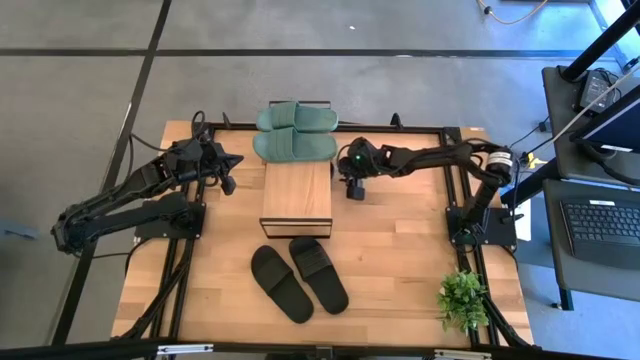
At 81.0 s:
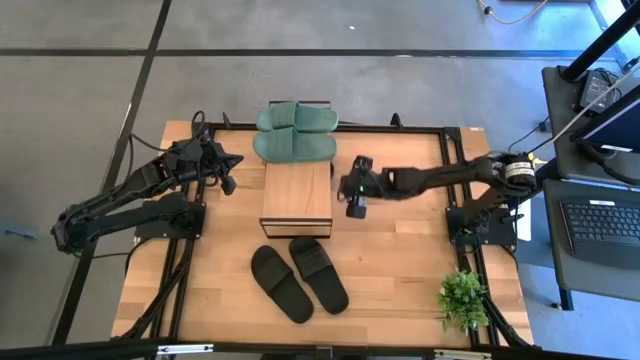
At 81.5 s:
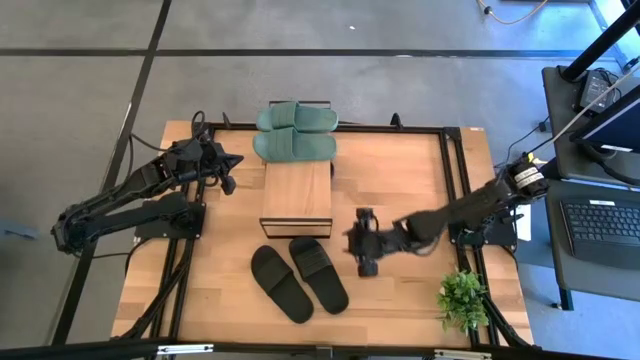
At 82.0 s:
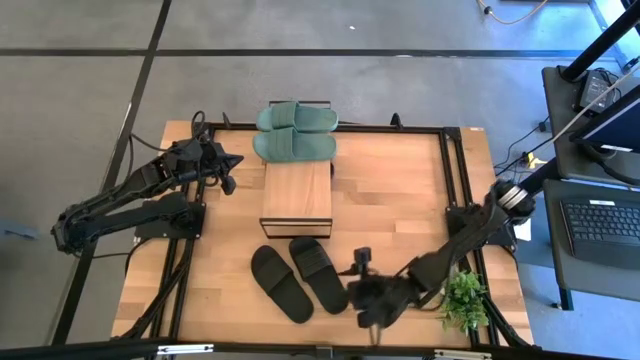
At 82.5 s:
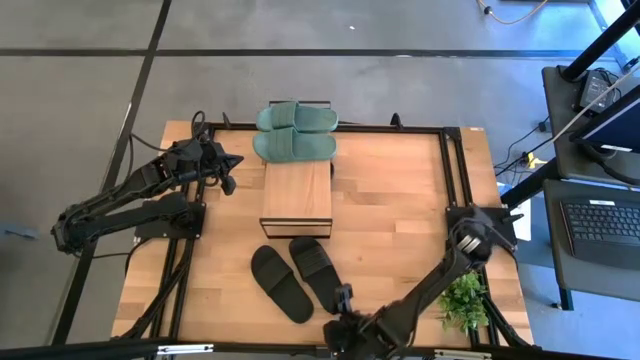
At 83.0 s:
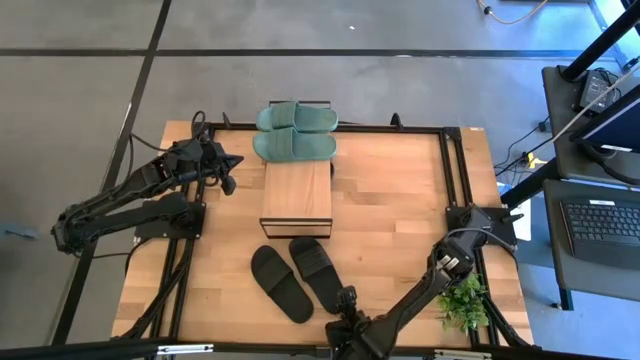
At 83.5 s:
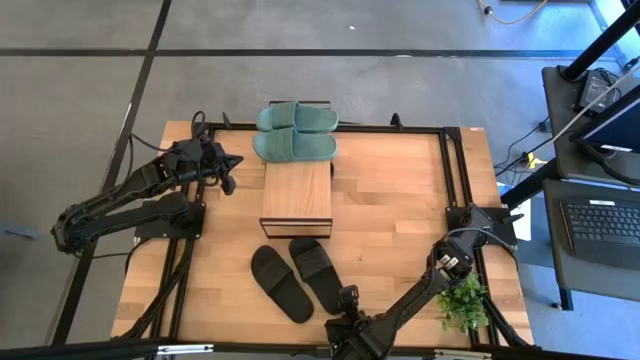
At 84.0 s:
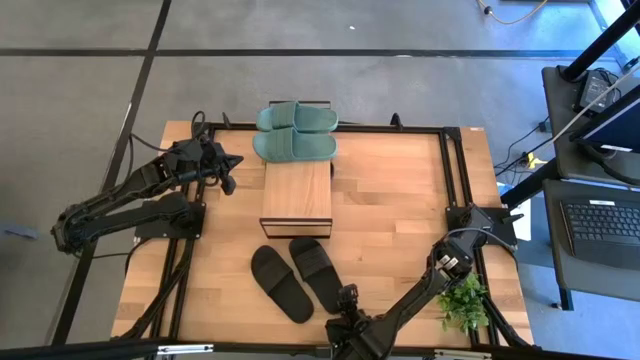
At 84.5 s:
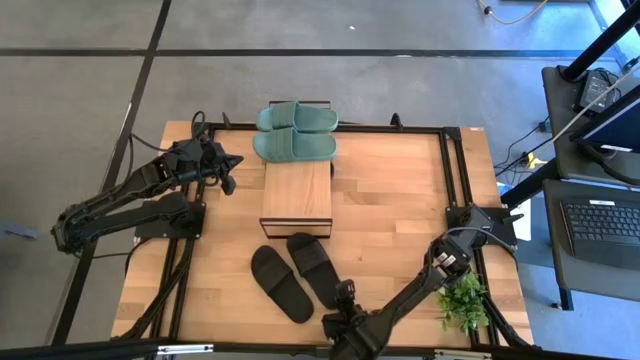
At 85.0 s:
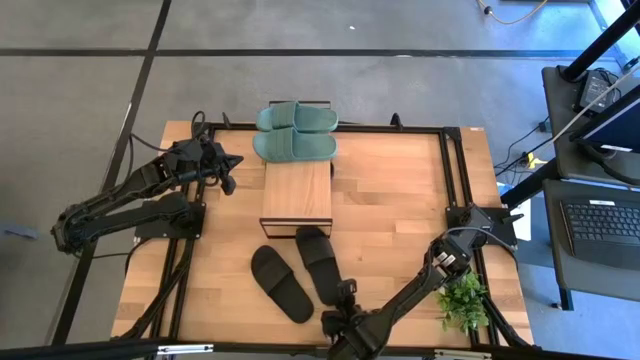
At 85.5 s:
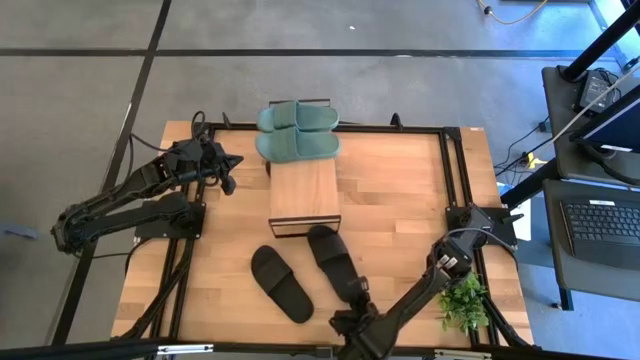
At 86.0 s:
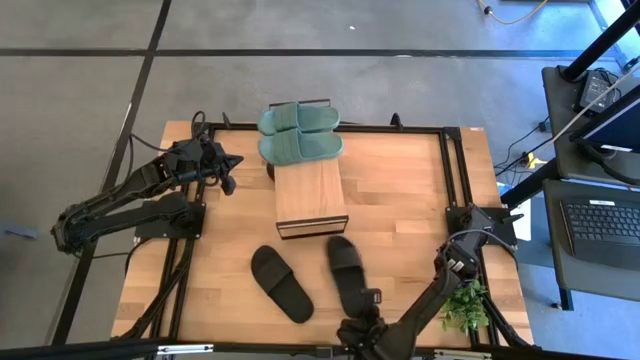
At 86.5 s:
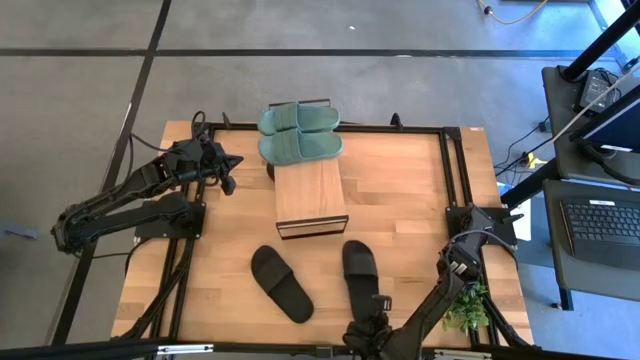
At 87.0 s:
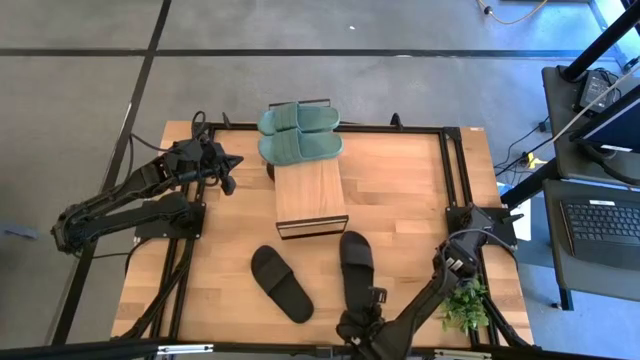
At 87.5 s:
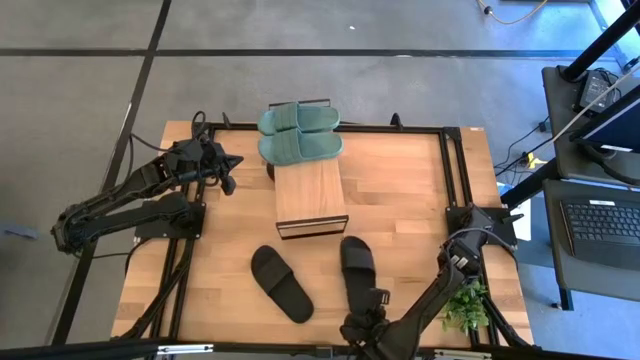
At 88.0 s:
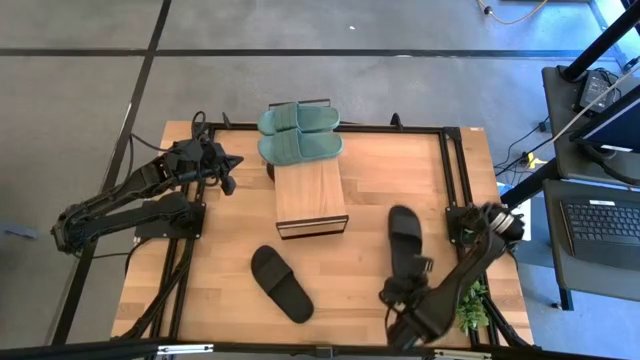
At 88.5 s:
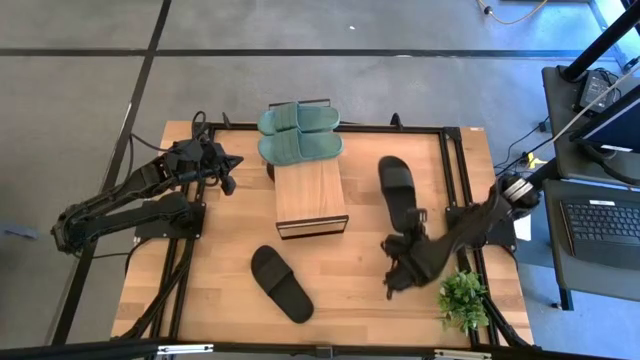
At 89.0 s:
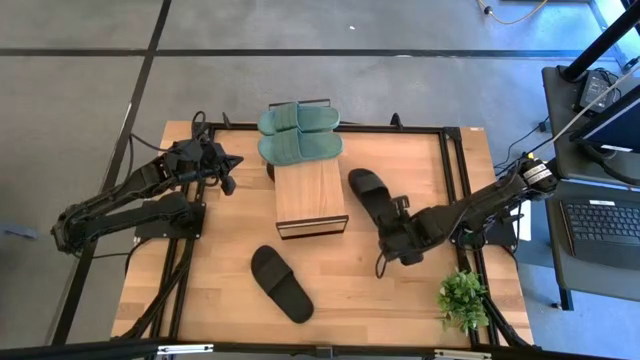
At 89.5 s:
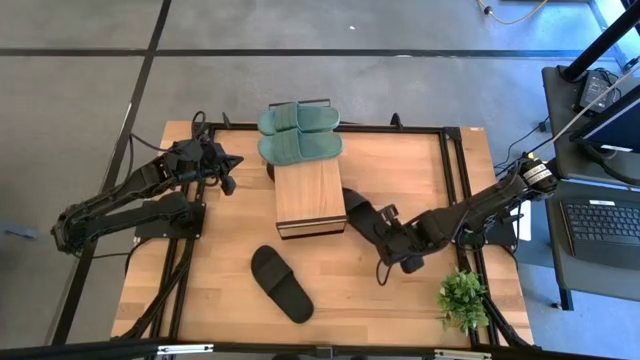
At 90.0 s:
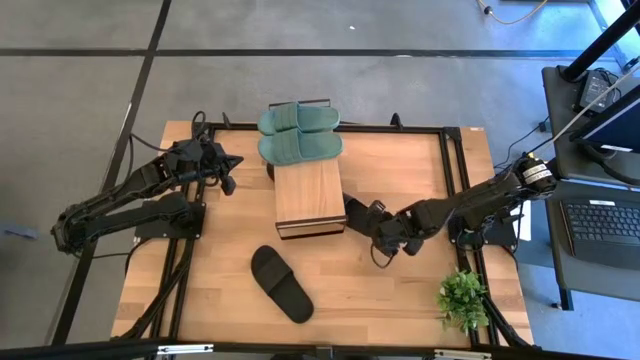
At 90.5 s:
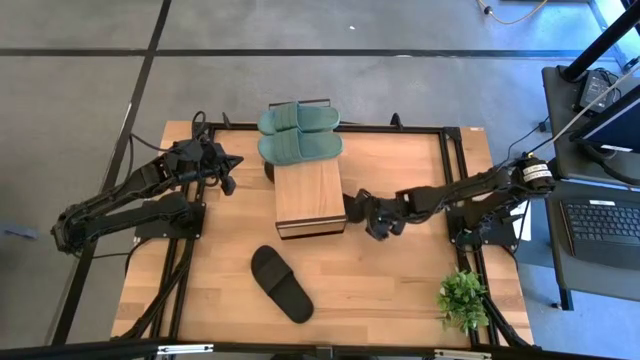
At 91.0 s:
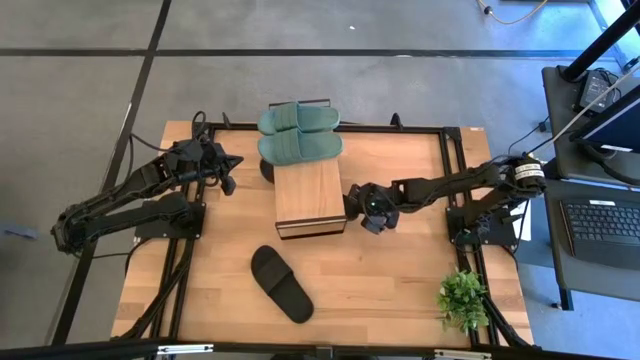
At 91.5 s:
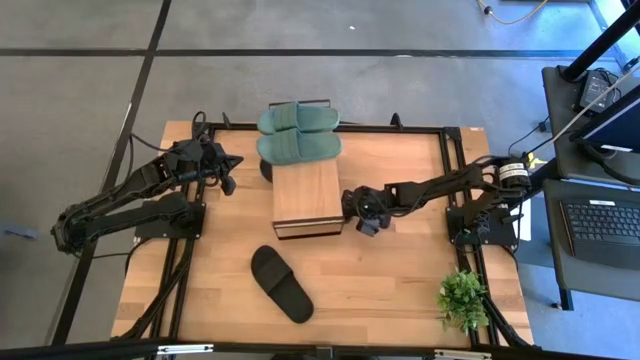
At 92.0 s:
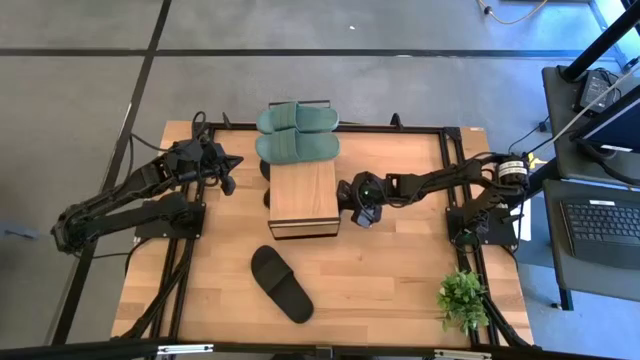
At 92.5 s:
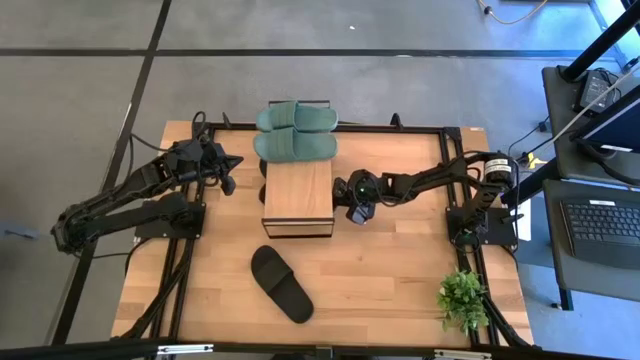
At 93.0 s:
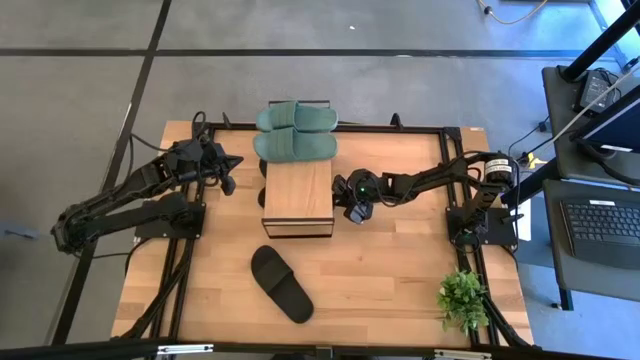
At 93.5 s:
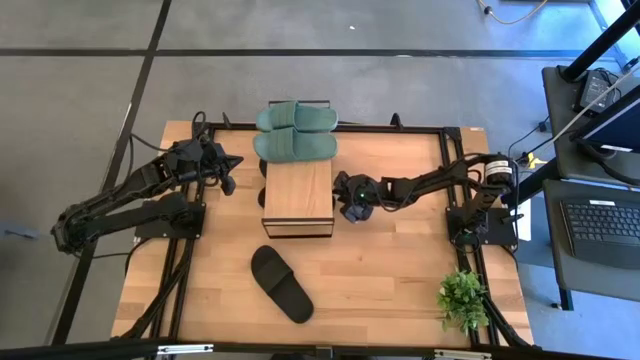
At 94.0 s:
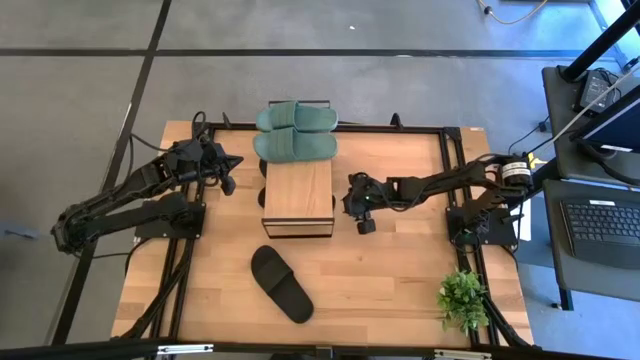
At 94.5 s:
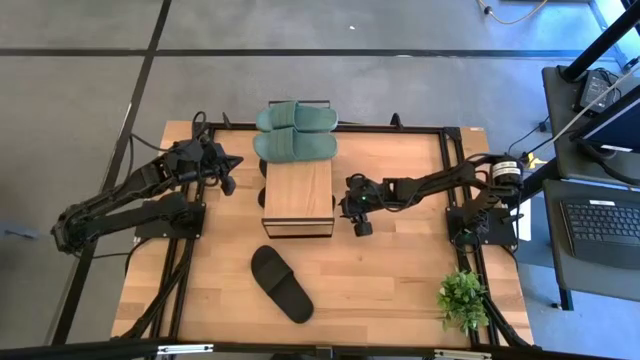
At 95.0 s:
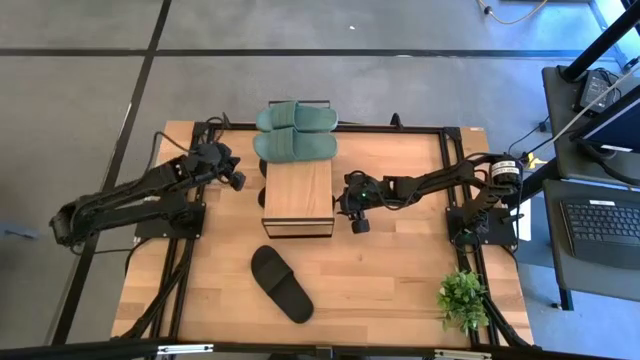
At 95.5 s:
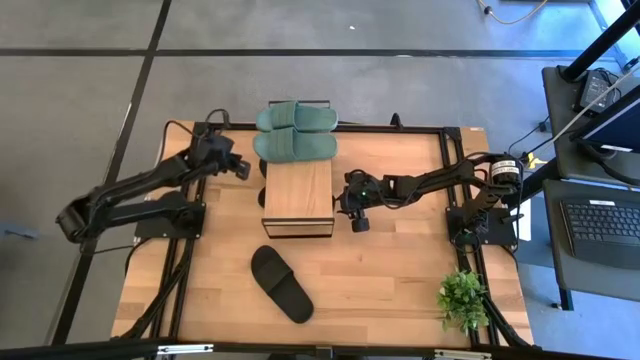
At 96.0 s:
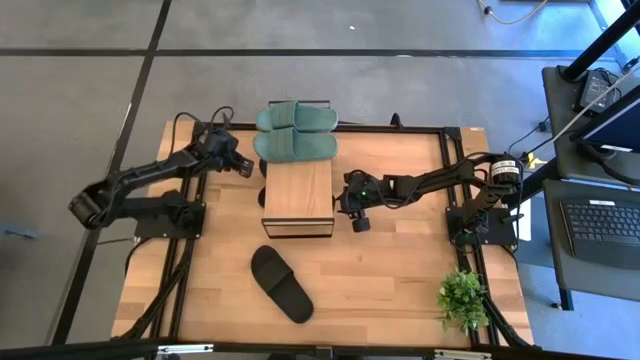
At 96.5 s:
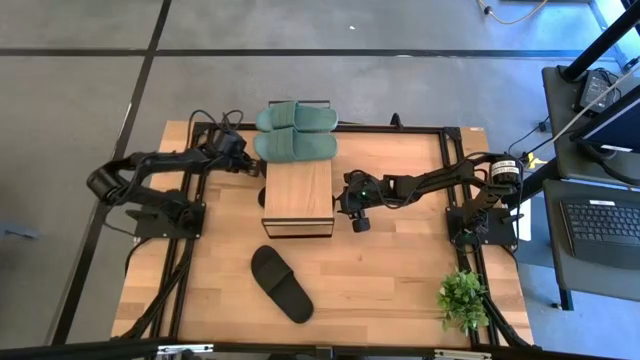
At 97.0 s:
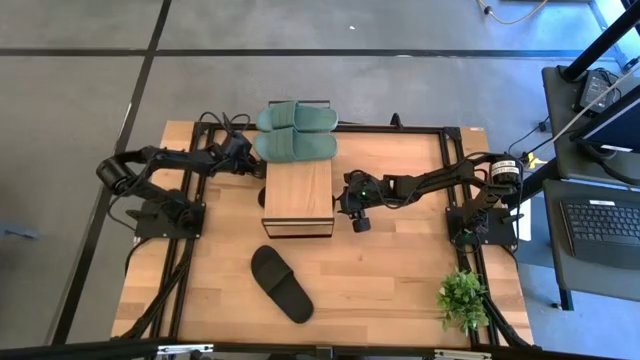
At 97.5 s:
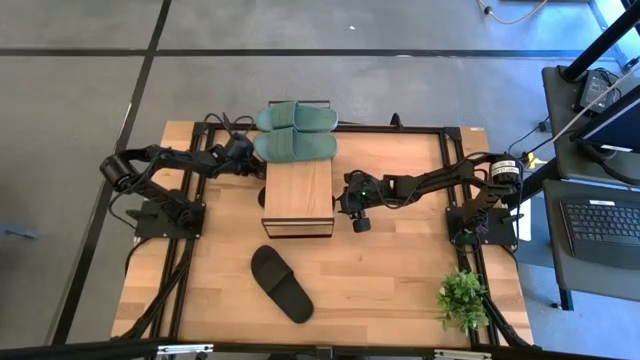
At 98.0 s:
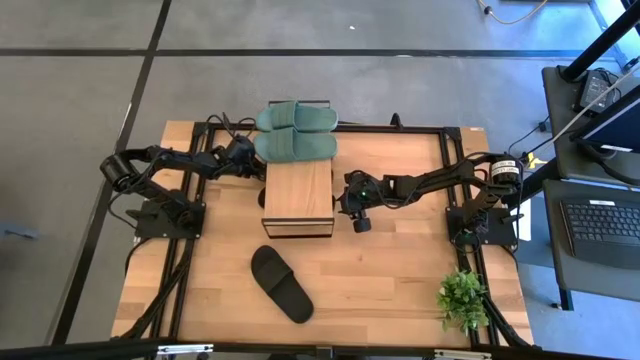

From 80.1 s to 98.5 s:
Task: Pick and place slides into the shelf
Put the black slide under the shelf

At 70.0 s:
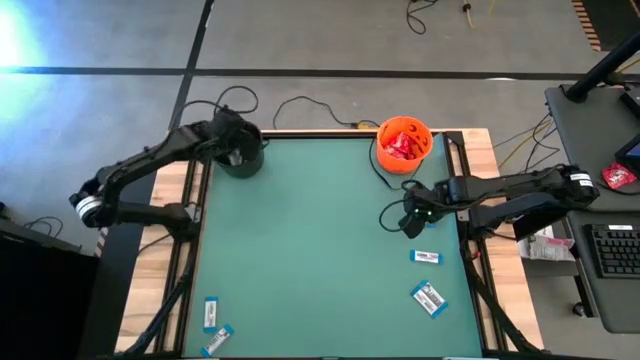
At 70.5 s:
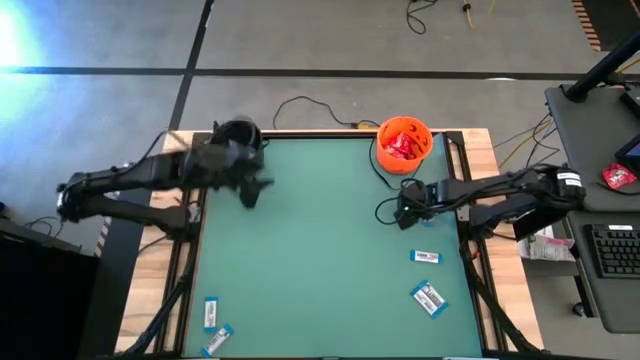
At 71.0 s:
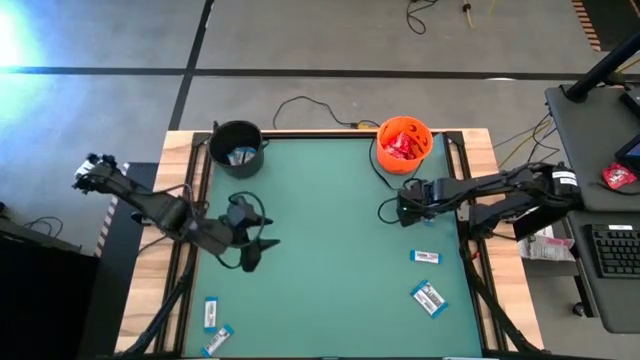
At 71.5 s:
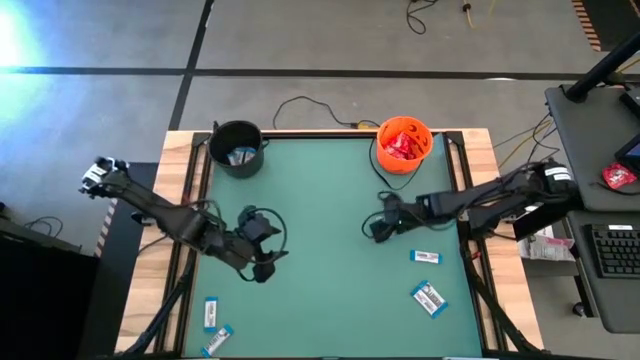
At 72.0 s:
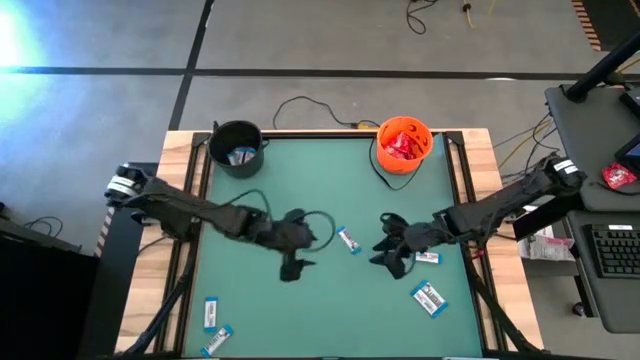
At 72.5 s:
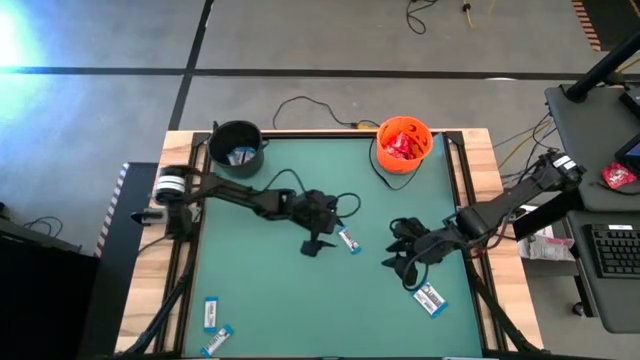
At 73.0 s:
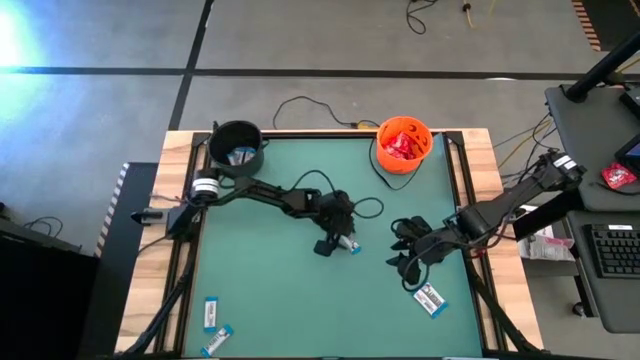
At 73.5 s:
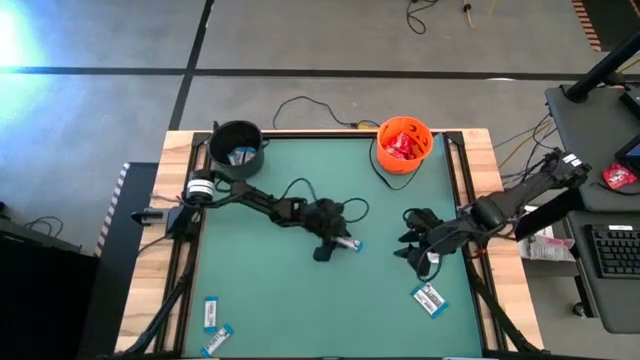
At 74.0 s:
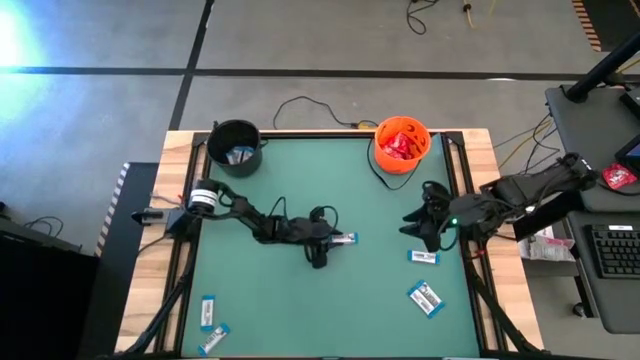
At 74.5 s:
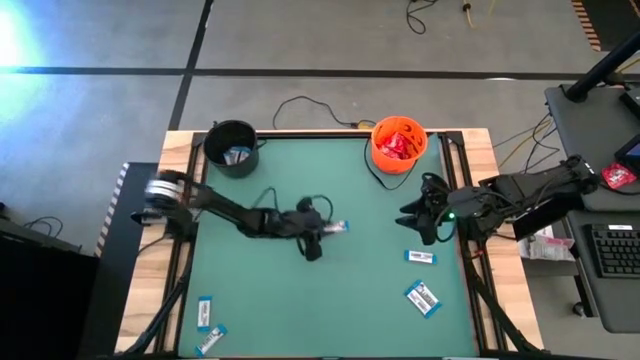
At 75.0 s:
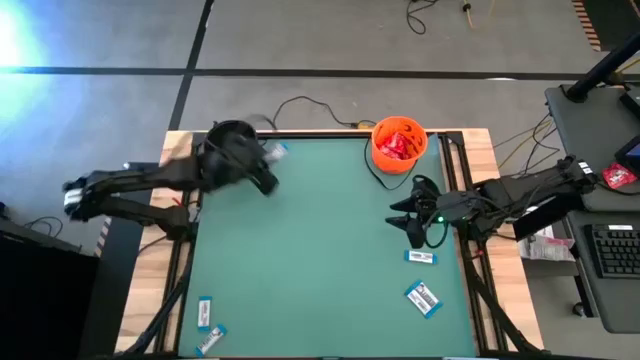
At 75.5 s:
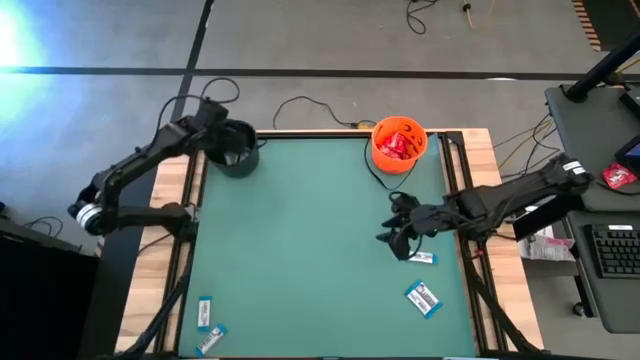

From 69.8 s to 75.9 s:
Task: Sort candy by brand, put in halloween buckets
Put the white candy into the black bucket
